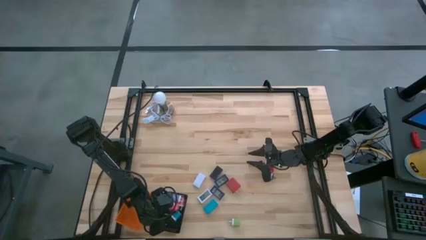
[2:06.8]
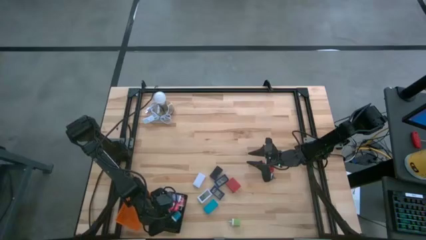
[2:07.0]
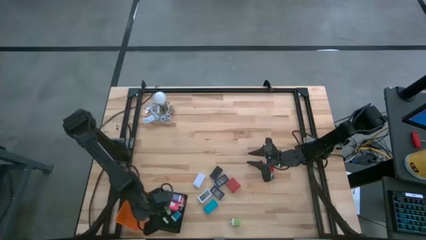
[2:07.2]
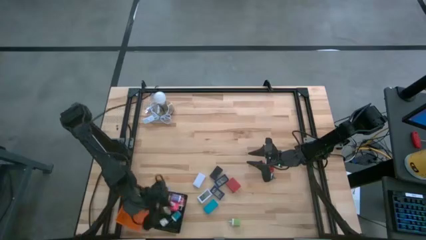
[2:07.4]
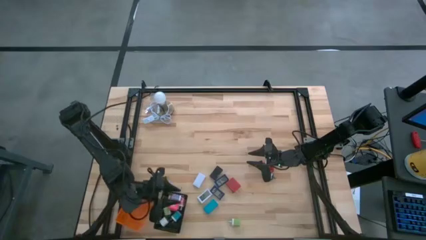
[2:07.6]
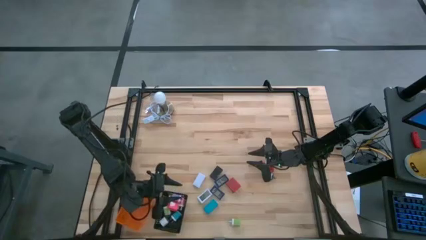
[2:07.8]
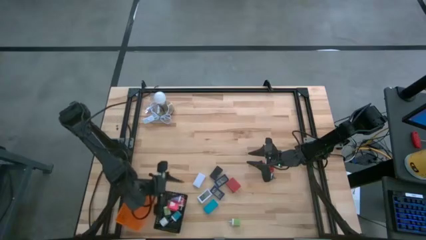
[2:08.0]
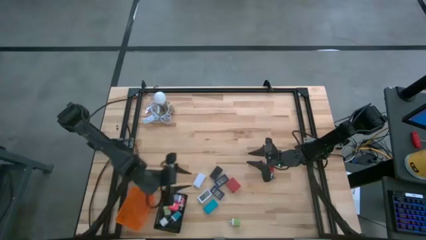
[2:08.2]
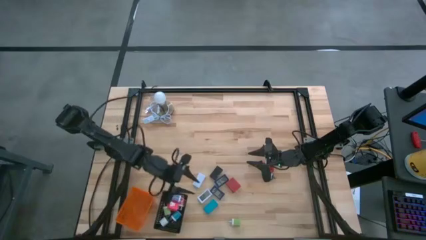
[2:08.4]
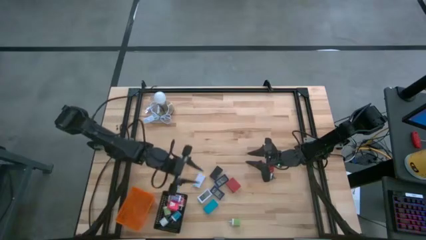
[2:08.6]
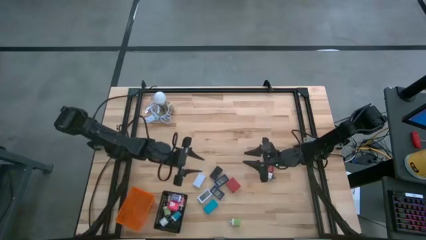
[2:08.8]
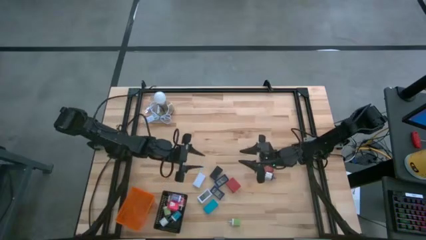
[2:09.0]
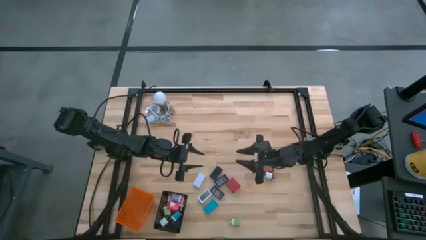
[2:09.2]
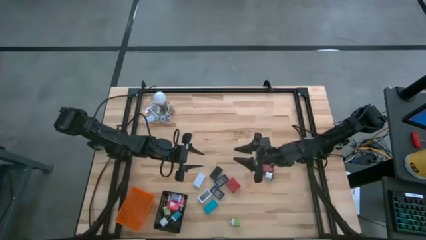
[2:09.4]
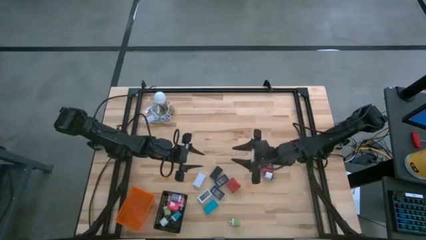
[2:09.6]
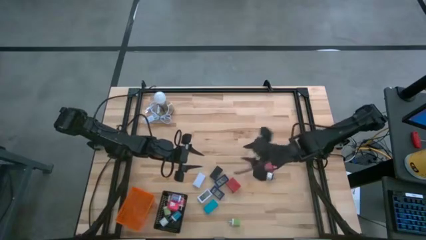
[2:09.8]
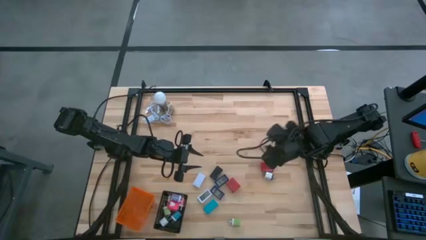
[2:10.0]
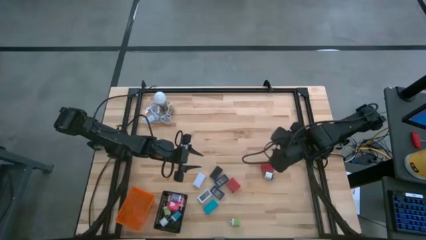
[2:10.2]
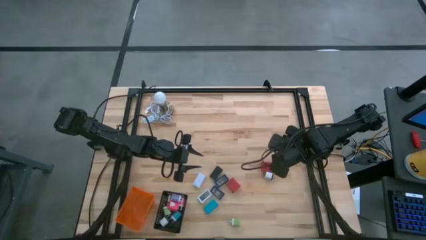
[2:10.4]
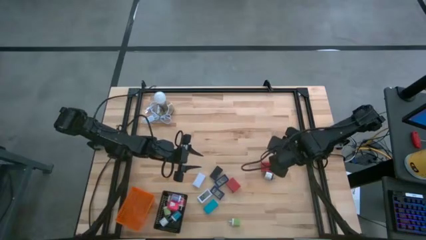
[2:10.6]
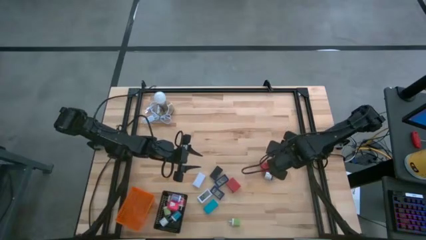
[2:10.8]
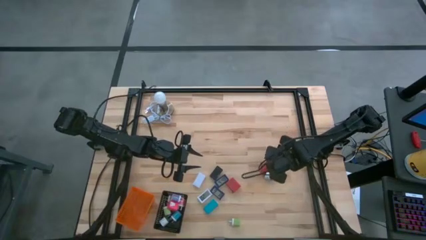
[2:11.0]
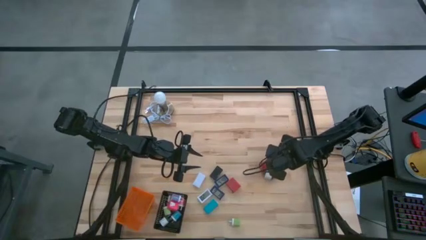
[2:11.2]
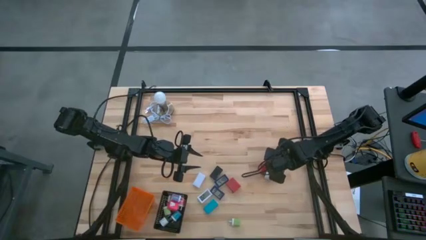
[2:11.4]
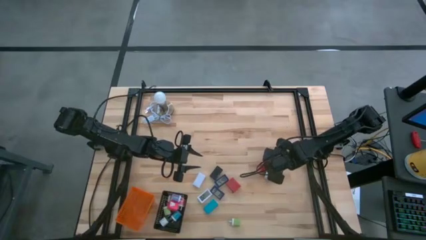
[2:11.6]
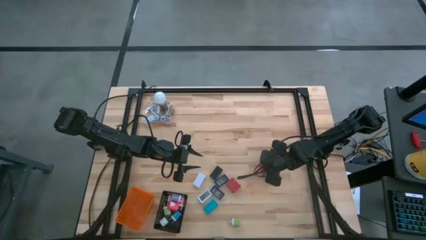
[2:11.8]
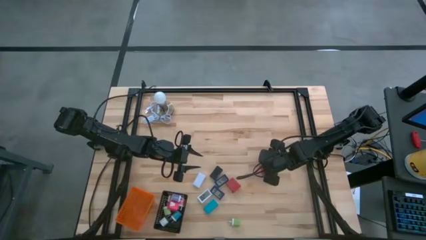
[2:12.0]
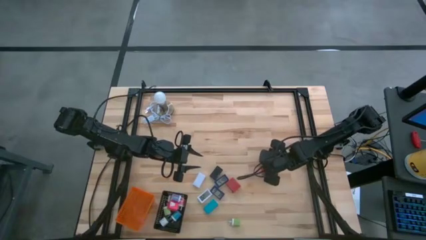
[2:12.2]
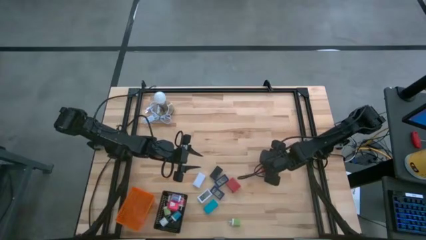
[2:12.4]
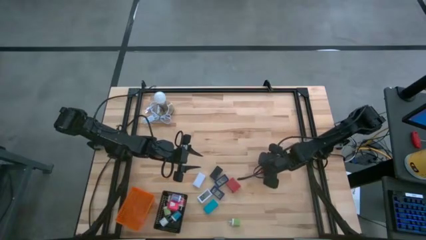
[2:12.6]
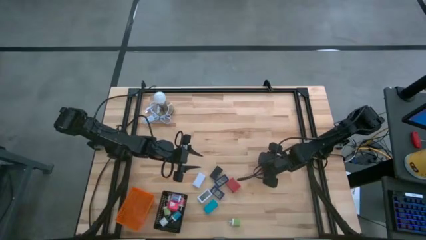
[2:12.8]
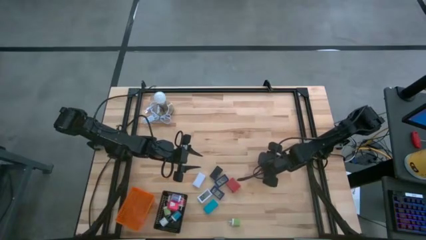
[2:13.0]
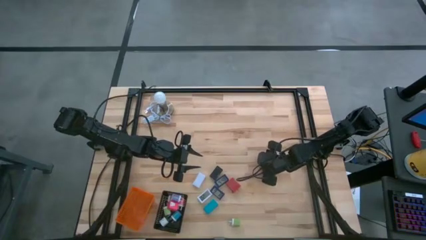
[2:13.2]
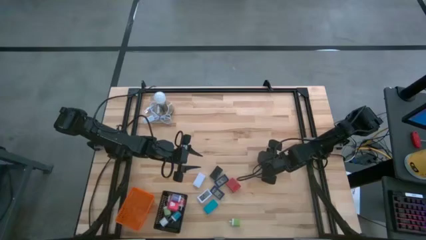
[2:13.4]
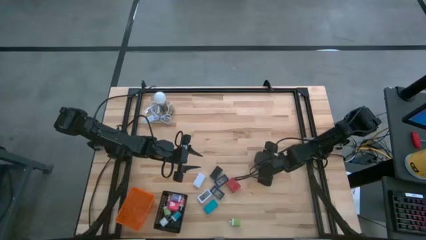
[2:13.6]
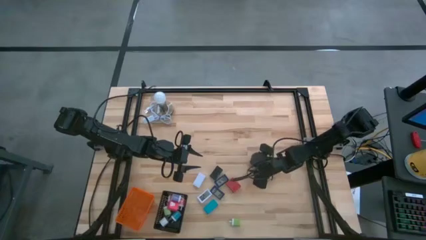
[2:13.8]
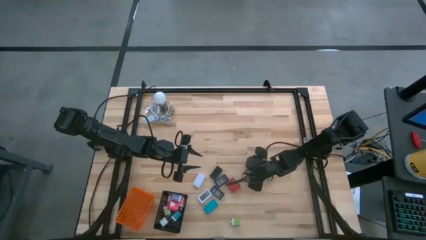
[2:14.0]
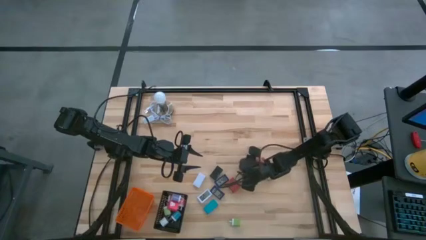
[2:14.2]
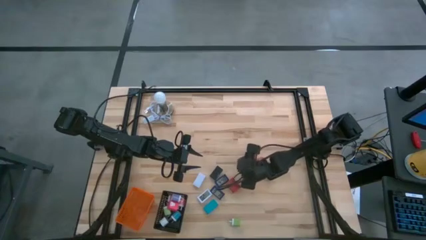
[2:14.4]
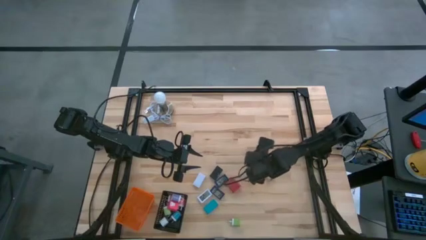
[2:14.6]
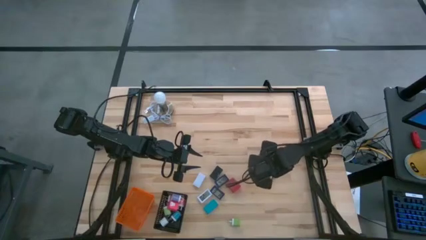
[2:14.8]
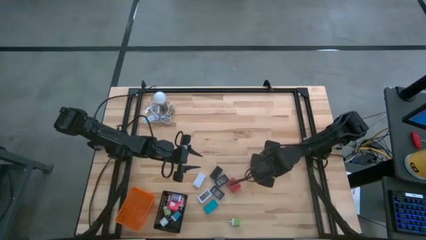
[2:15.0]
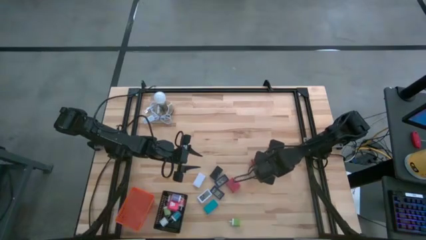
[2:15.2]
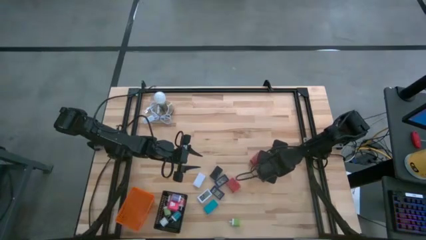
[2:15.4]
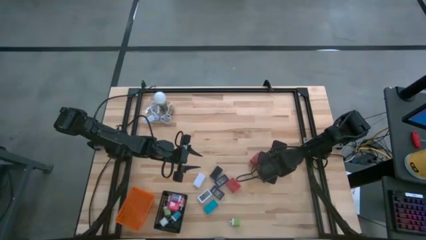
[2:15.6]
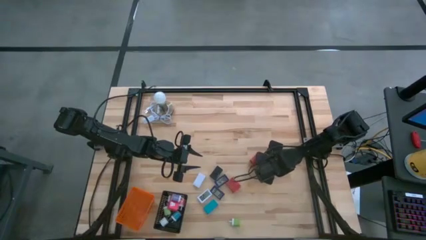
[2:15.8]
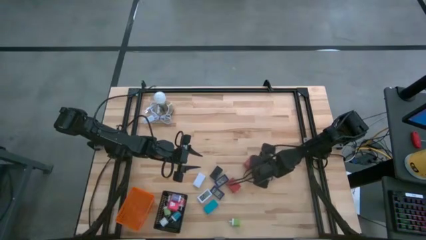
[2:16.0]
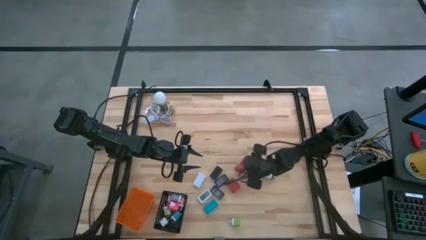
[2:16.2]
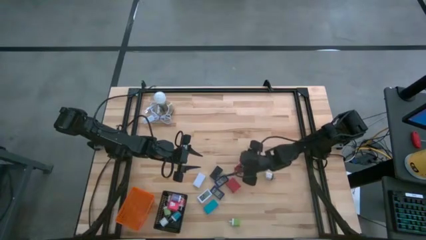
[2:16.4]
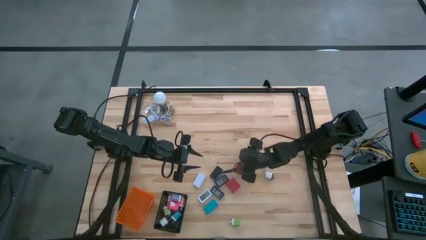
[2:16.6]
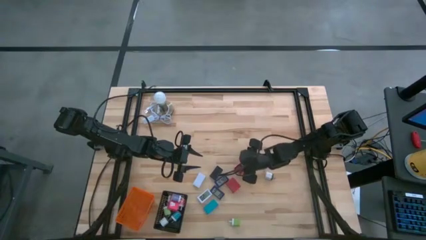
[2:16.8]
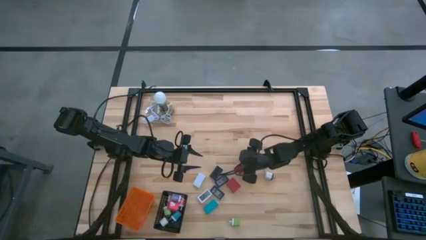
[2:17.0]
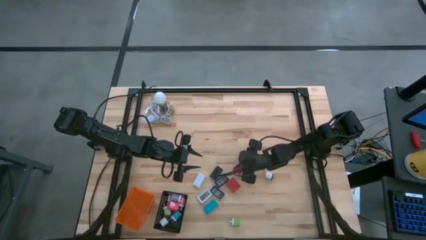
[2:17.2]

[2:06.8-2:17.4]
Task: Pick & Place Office items
Put the top red charger adapter into the black basket
